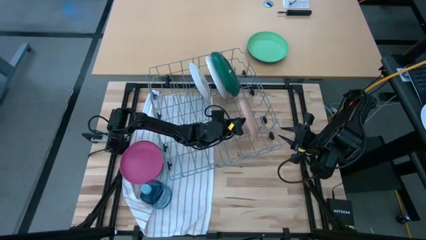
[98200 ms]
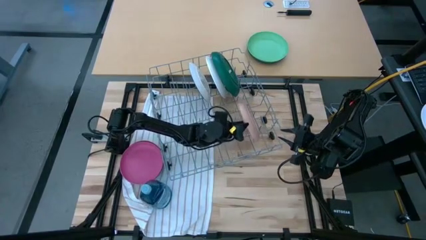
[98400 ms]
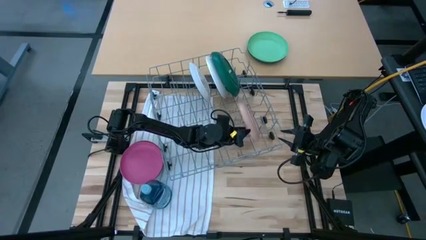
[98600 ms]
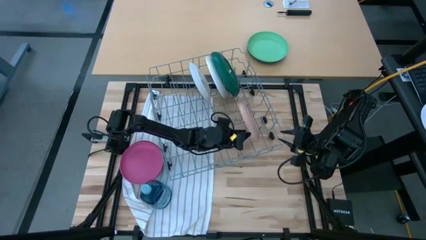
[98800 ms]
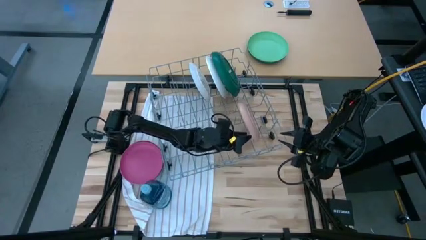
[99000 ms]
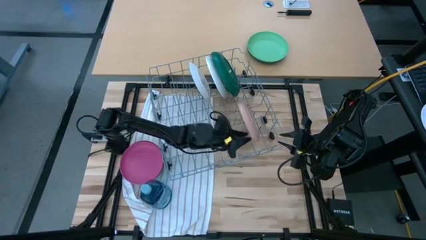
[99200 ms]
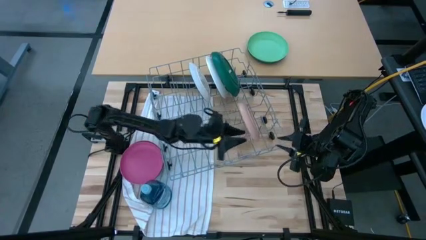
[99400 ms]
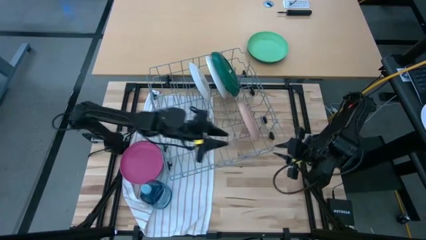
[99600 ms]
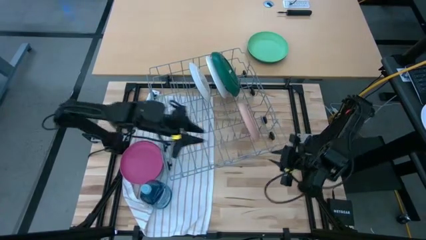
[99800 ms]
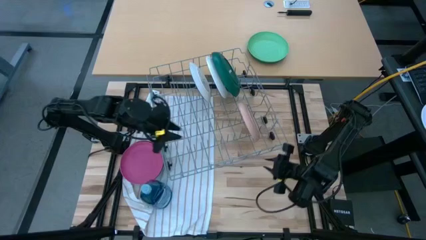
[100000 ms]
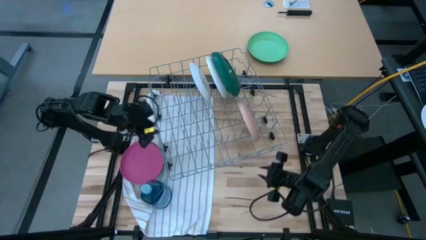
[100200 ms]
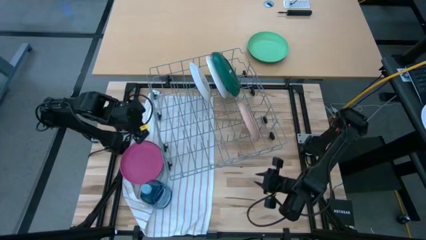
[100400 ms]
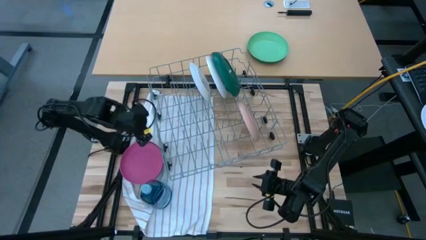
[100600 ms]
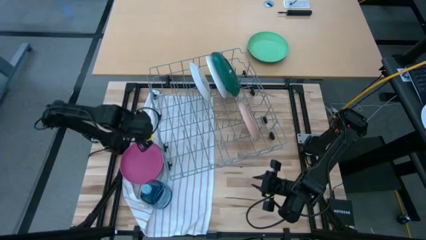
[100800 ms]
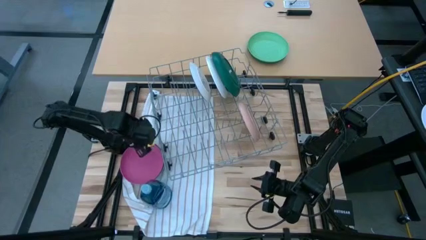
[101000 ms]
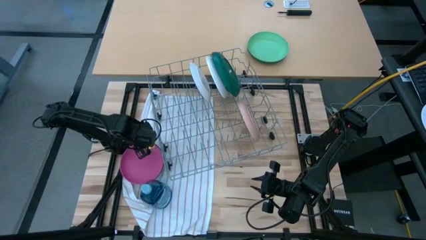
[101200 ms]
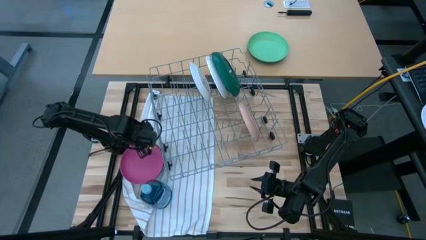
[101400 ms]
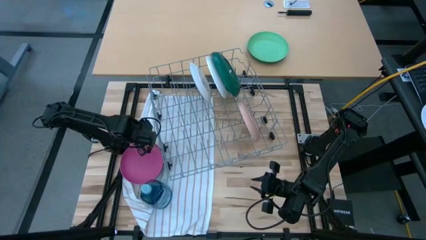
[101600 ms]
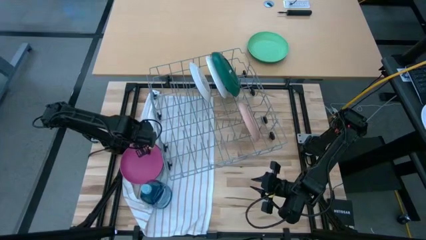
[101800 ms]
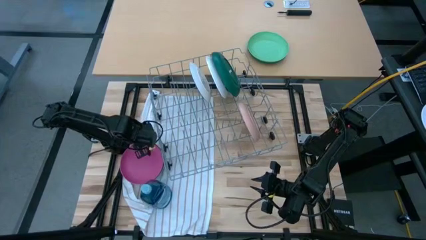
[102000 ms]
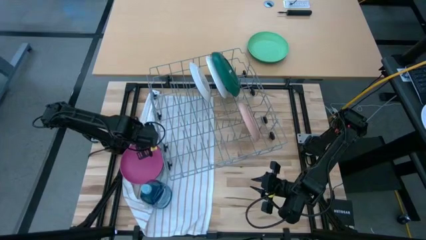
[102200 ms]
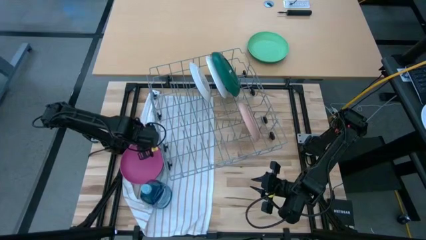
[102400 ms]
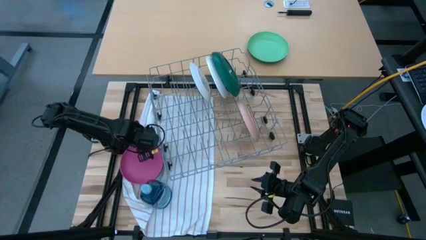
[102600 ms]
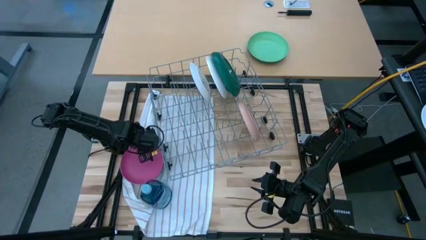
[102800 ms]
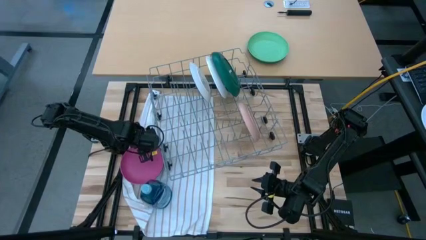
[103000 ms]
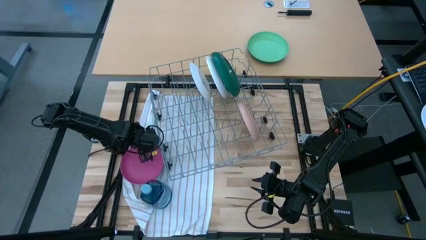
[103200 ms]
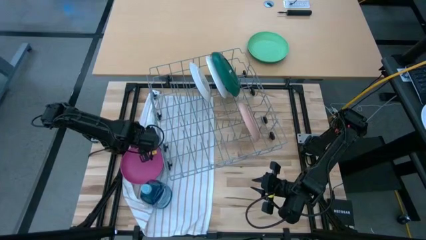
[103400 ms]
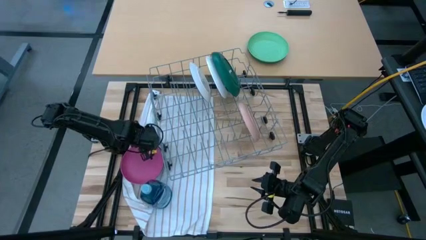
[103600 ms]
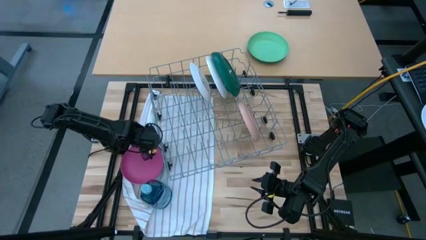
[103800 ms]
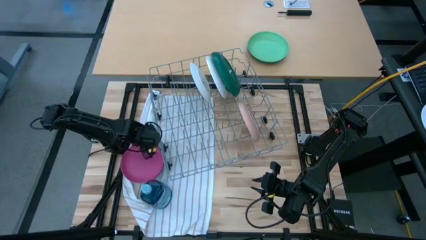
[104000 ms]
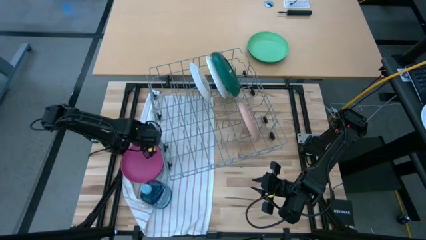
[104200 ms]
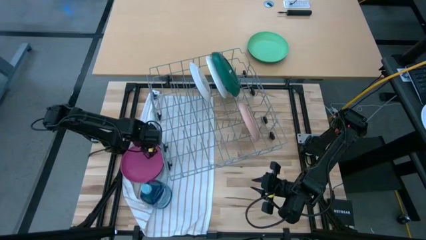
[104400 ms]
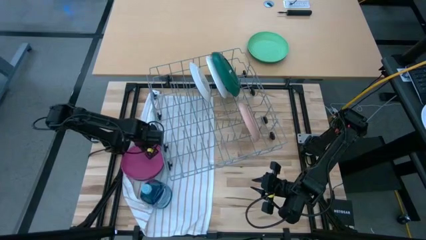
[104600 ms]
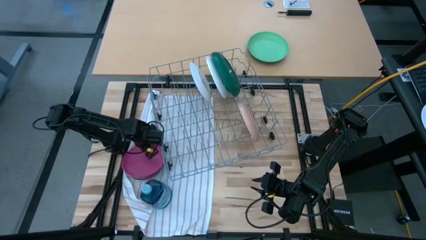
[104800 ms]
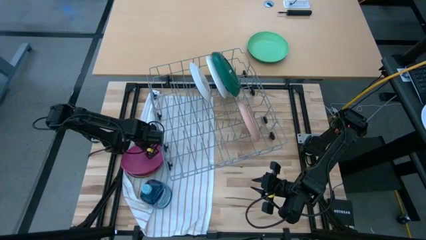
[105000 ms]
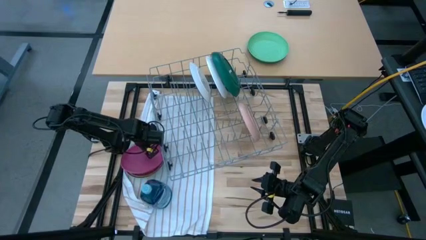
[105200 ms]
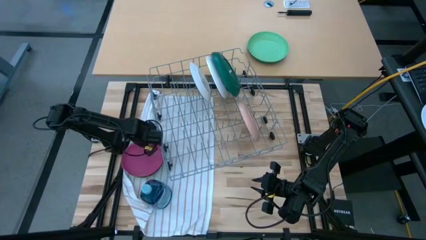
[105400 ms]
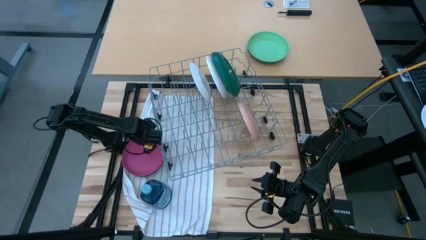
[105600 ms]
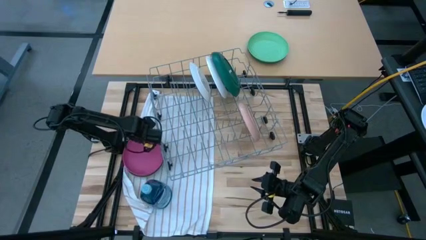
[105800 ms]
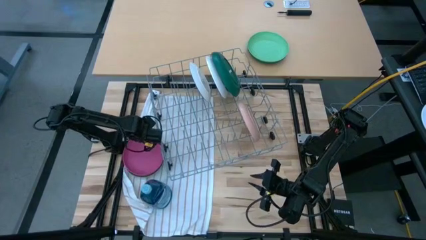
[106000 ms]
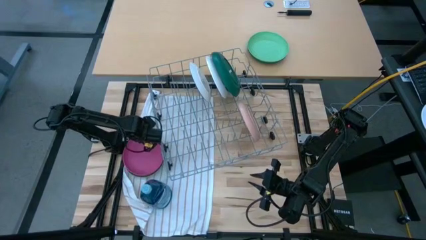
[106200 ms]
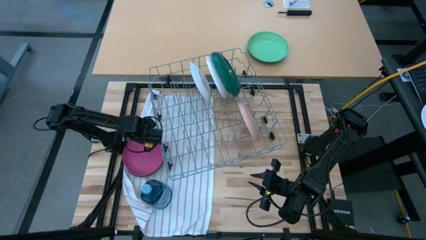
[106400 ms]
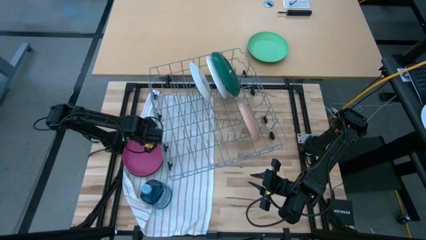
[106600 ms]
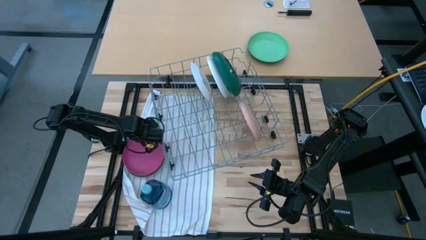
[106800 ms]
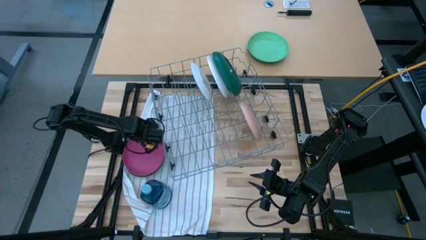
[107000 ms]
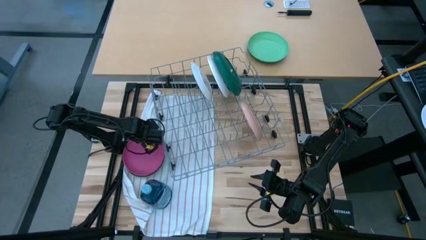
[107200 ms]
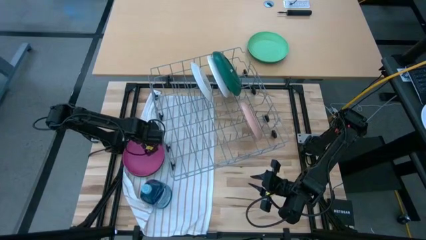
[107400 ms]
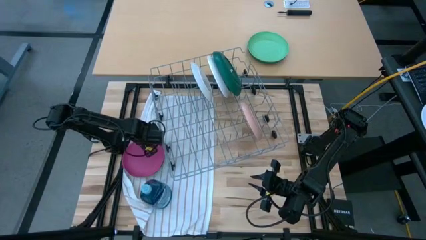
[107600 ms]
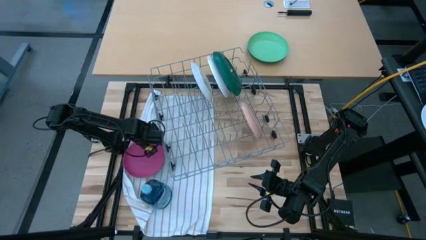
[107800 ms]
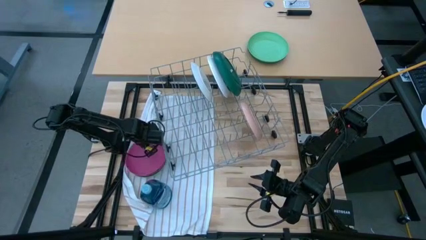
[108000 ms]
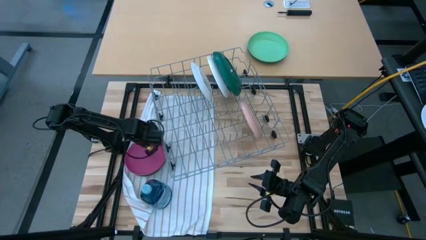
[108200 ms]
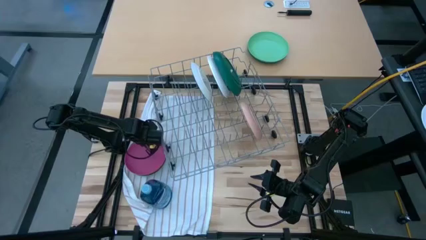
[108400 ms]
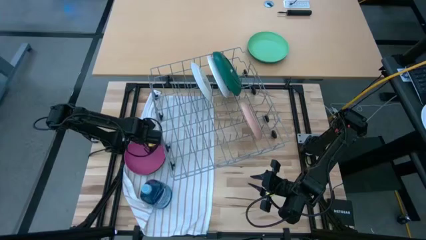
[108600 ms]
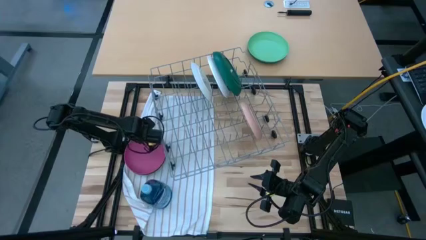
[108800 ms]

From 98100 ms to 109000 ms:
Task: Sort dishes
Put the pink plate into the dish rack

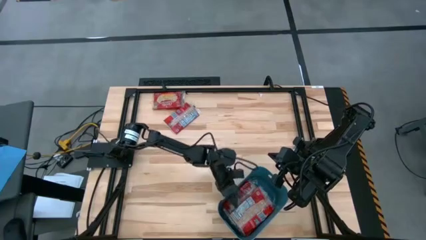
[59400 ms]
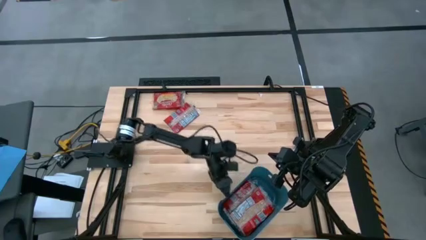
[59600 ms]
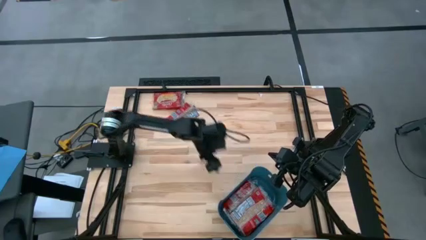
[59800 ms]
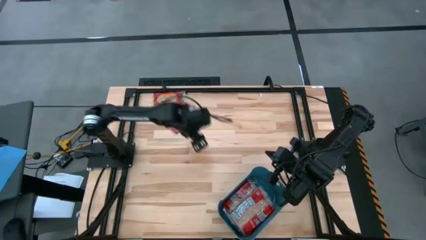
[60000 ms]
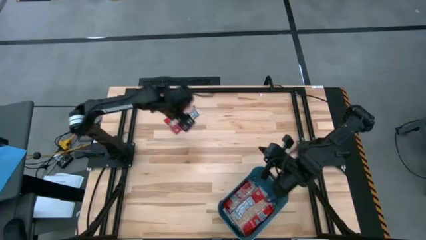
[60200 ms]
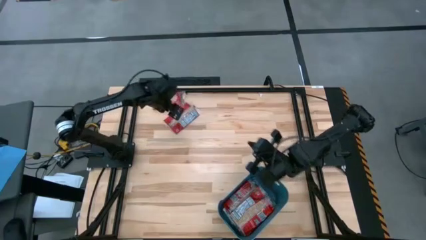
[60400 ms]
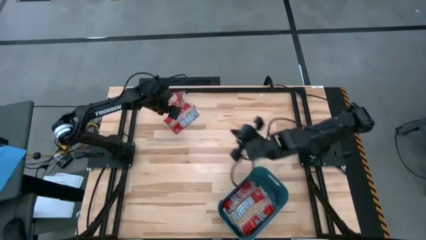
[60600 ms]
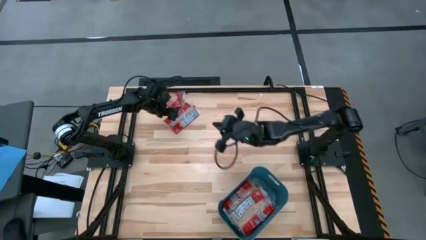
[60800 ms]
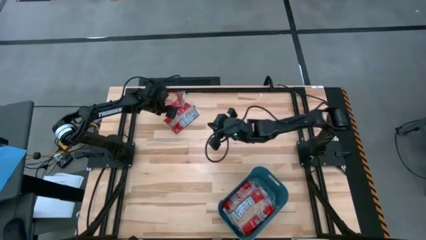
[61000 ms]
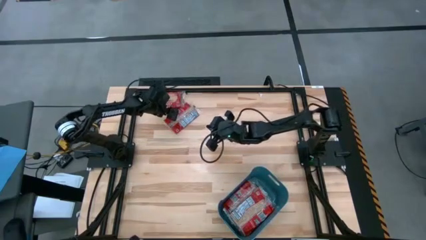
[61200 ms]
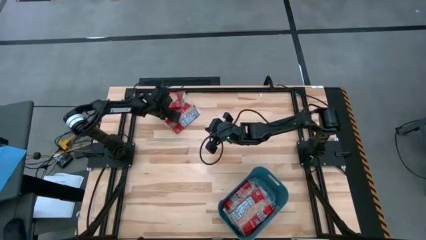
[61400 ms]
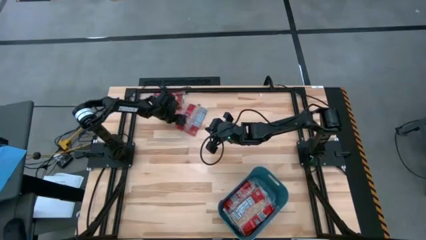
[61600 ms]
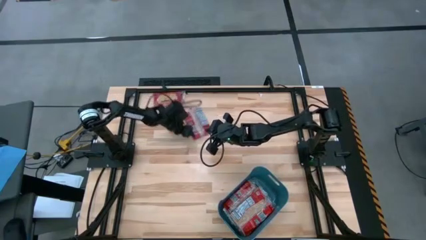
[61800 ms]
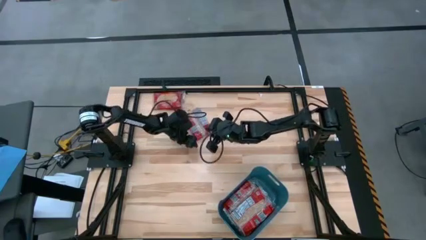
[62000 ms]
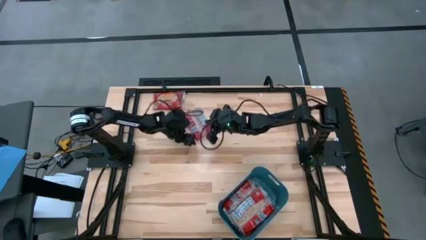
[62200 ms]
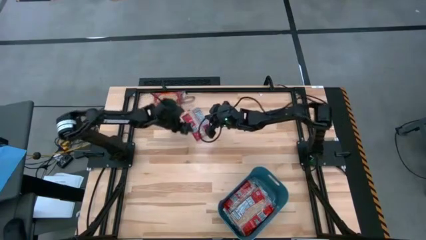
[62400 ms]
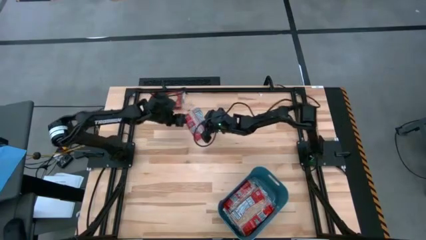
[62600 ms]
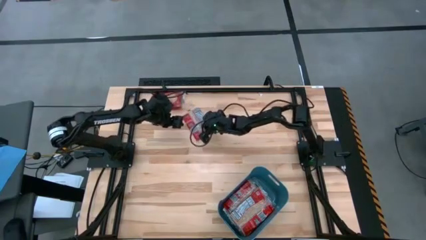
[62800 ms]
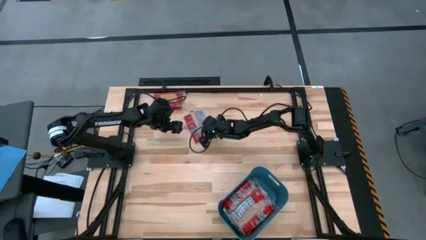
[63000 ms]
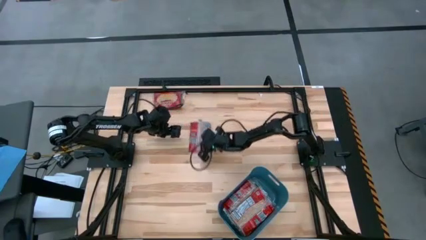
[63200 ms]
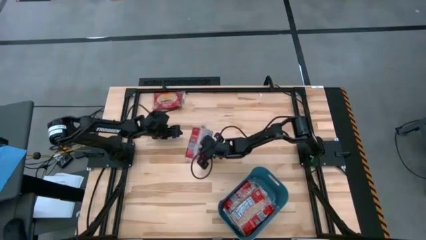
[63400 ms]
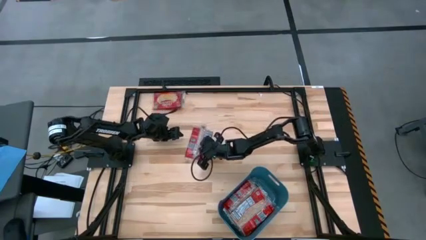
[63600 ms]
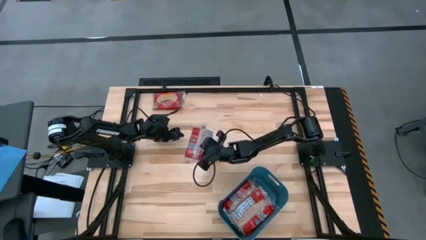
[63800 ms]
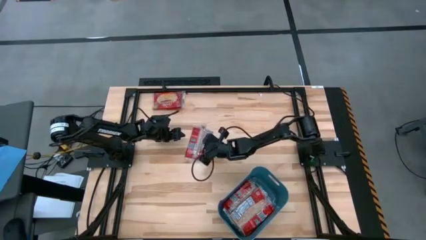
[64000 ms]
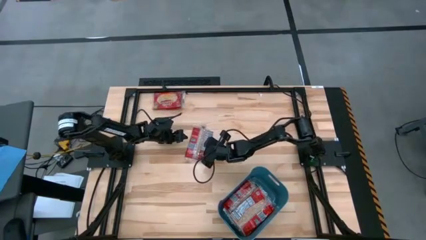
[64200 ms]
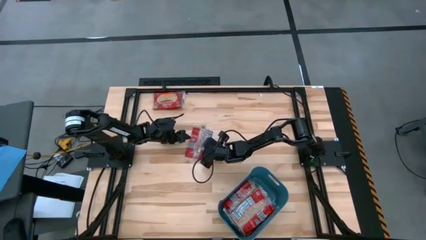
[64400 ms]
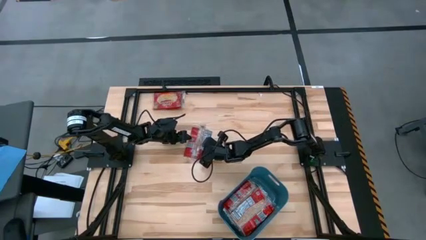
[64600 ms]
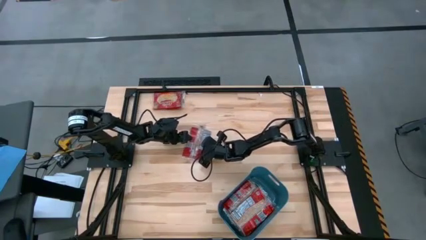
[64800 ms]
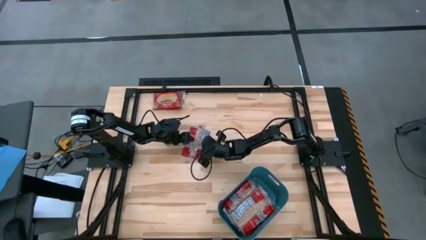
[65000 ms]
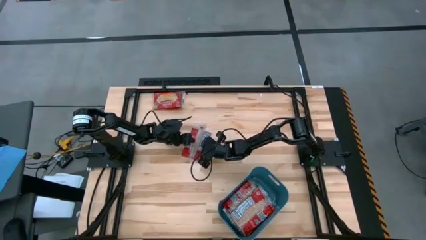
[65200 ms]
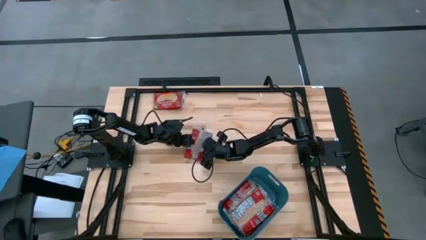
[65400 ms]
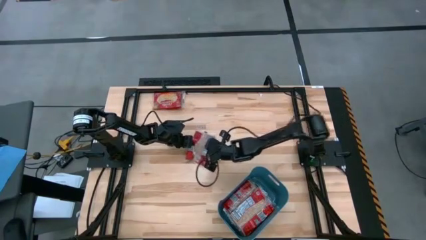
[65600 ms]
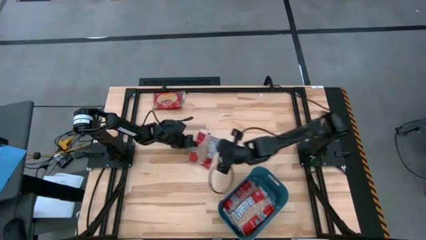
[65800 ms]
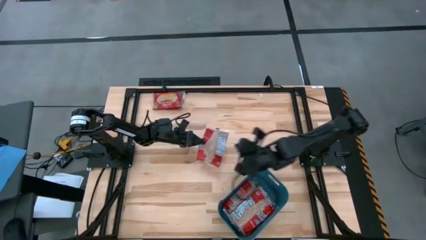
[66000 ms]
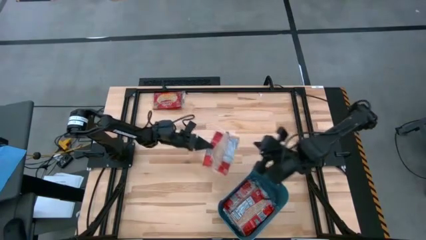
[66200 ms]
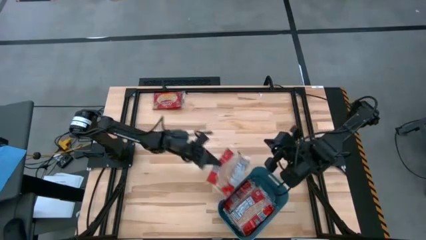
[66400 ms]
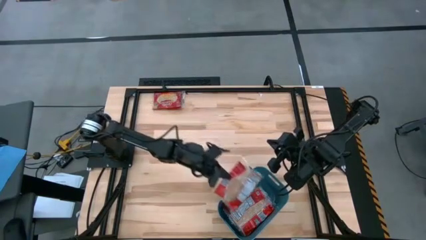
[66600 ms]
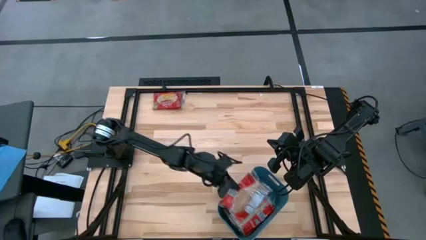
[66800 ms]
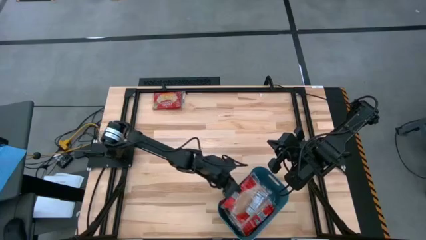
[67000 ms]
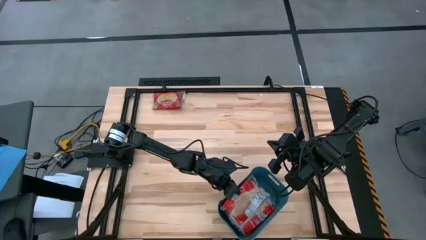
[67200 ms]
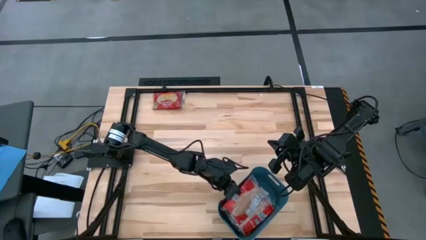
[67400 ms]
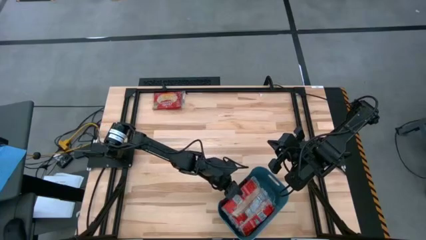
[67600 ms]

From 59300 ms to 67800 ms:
Task: Sort popcorn bags into baskets
Put the popcorn bag into the blue container
